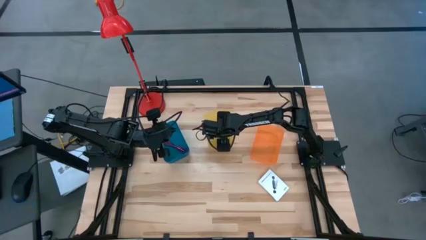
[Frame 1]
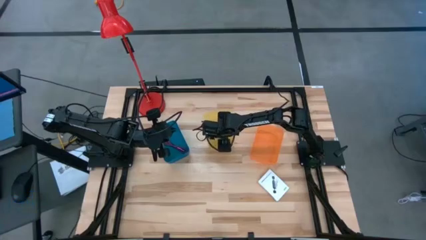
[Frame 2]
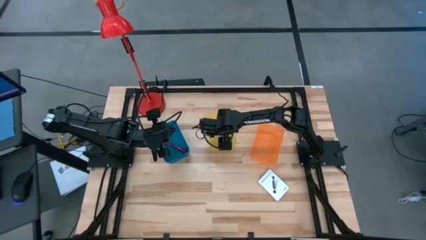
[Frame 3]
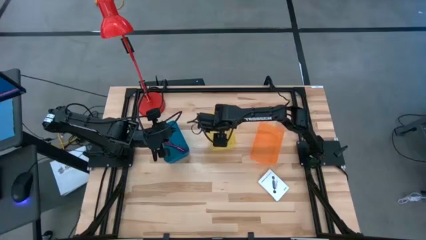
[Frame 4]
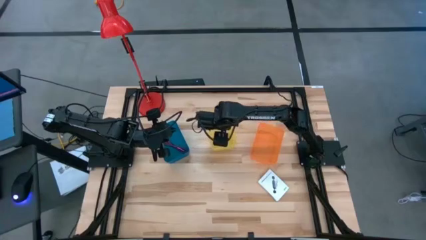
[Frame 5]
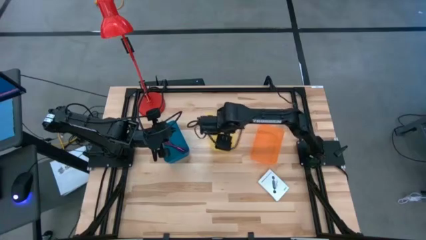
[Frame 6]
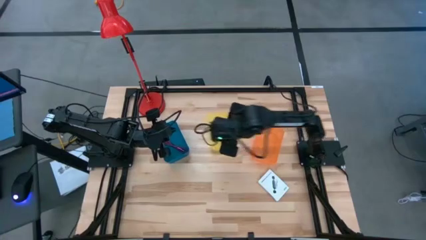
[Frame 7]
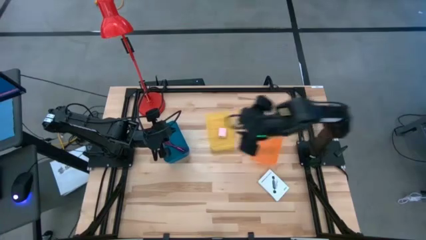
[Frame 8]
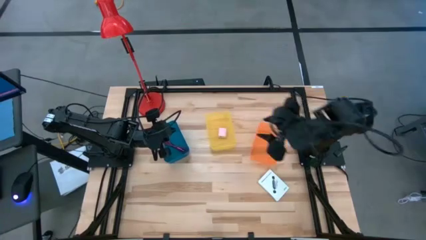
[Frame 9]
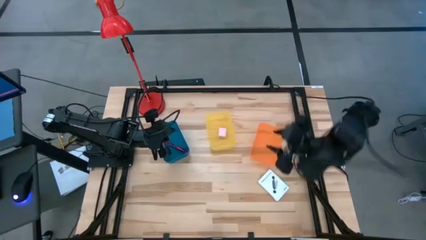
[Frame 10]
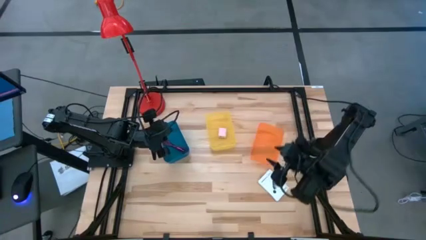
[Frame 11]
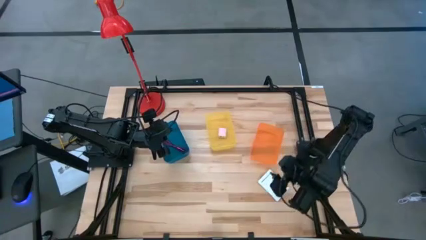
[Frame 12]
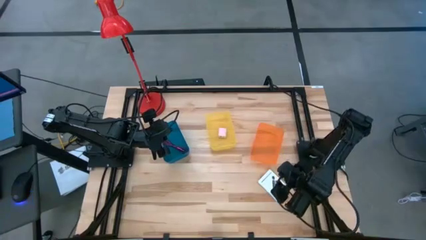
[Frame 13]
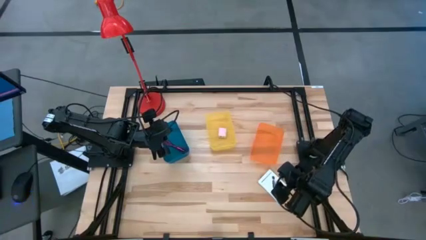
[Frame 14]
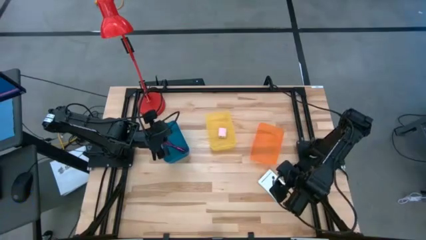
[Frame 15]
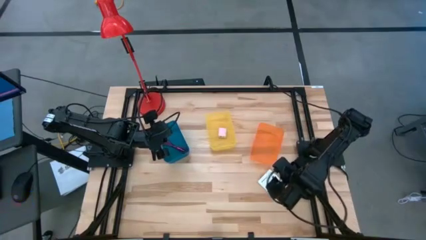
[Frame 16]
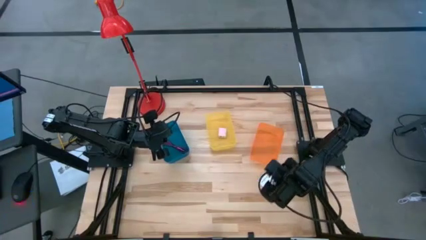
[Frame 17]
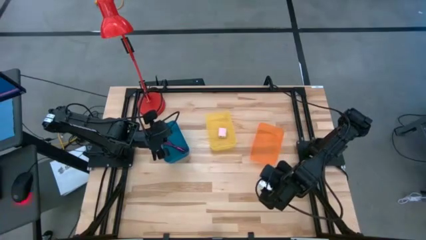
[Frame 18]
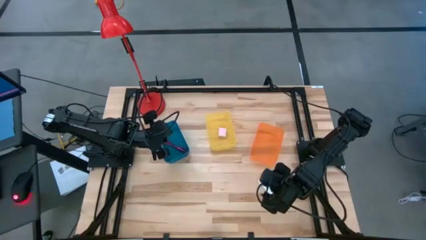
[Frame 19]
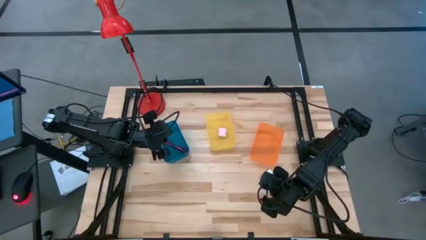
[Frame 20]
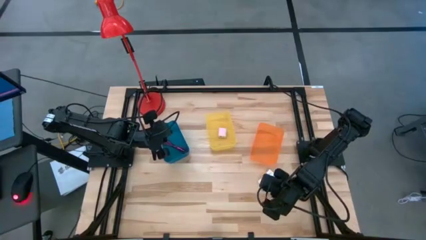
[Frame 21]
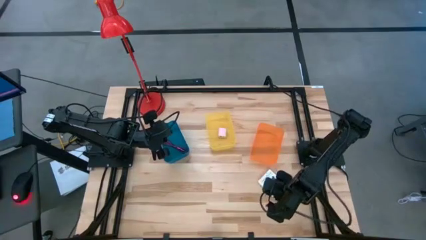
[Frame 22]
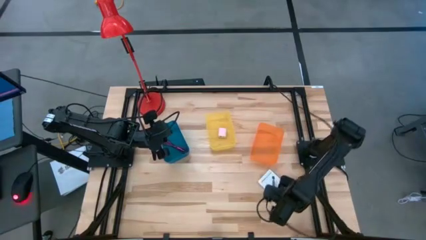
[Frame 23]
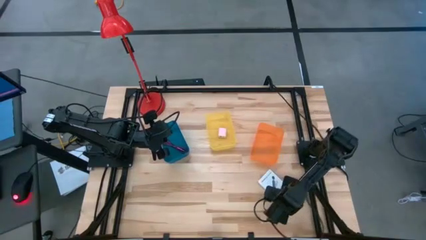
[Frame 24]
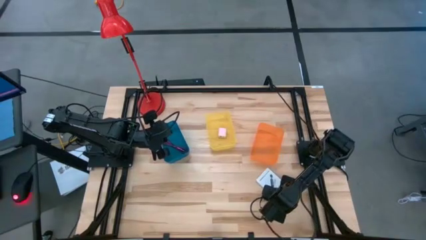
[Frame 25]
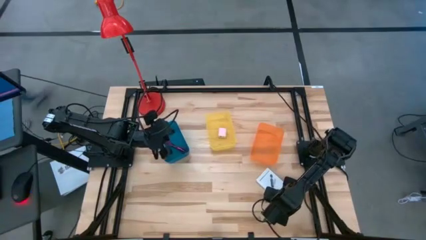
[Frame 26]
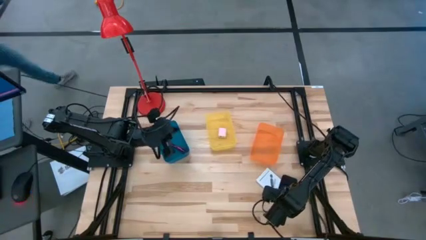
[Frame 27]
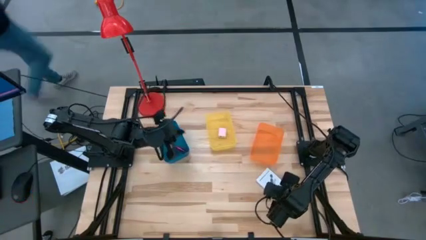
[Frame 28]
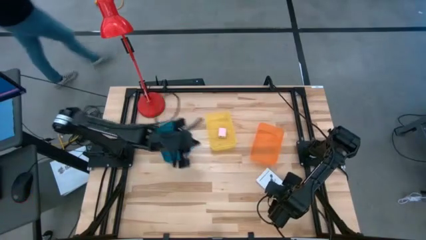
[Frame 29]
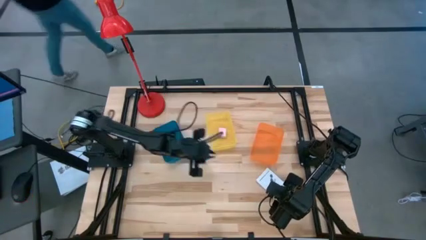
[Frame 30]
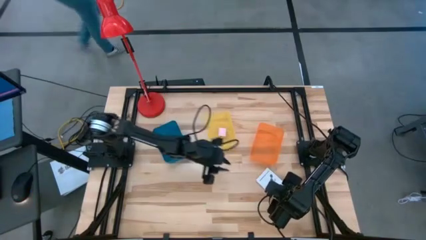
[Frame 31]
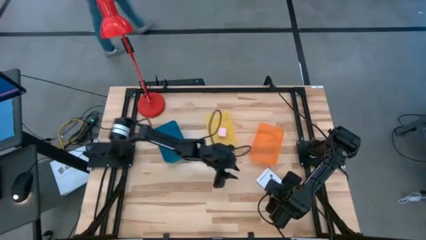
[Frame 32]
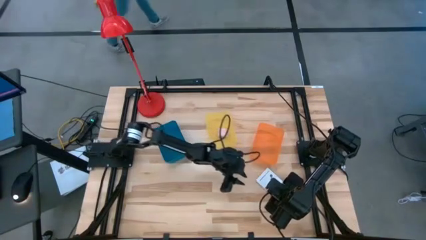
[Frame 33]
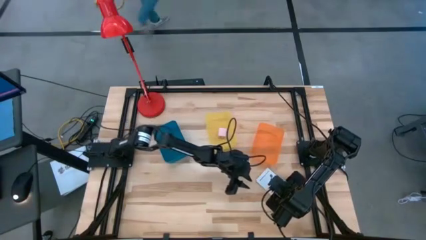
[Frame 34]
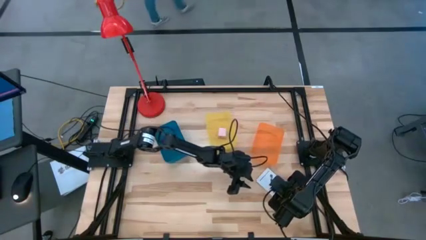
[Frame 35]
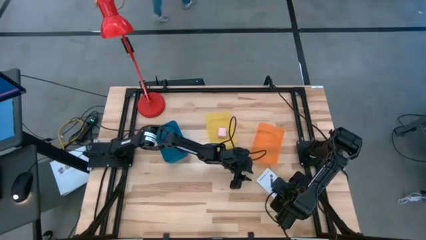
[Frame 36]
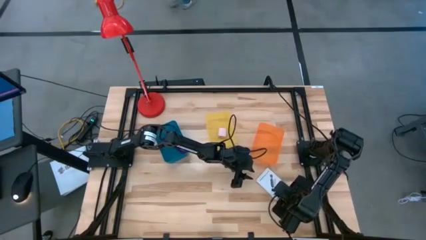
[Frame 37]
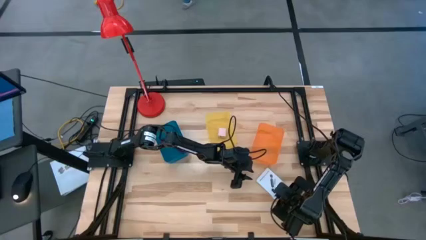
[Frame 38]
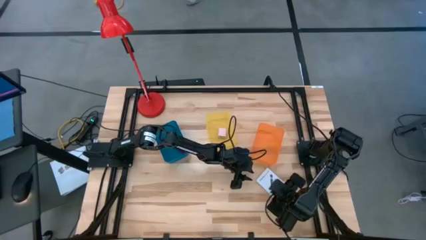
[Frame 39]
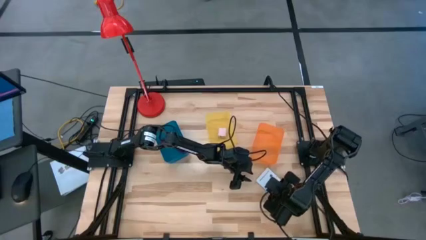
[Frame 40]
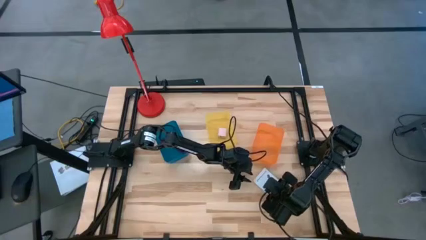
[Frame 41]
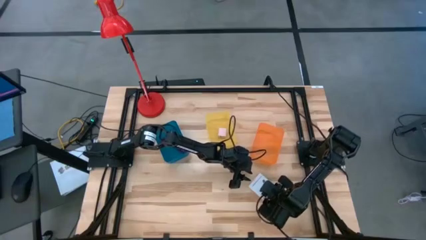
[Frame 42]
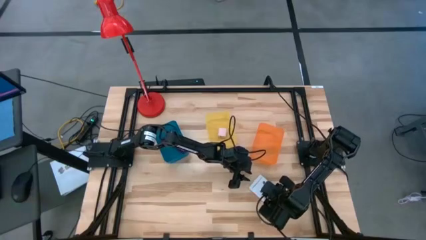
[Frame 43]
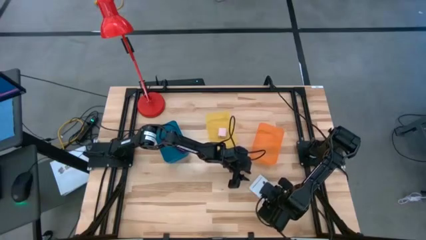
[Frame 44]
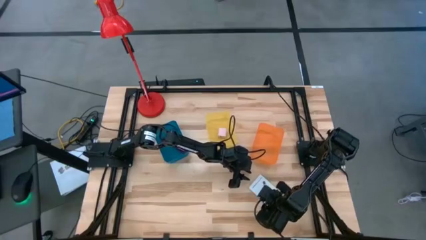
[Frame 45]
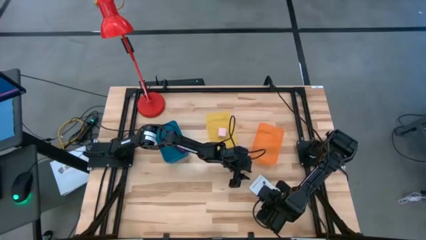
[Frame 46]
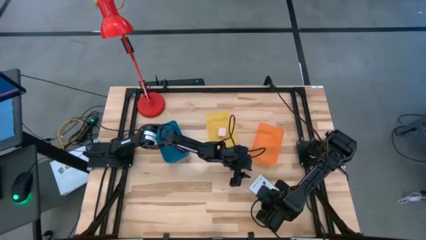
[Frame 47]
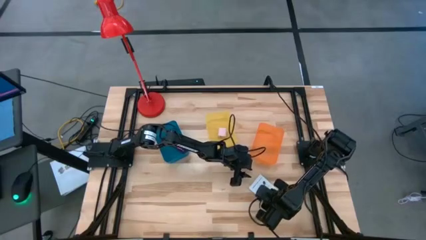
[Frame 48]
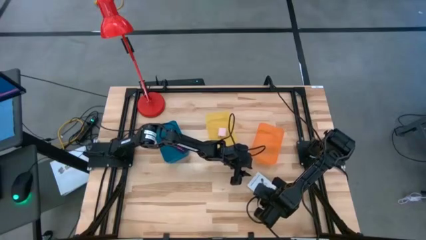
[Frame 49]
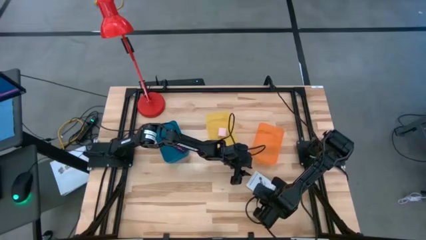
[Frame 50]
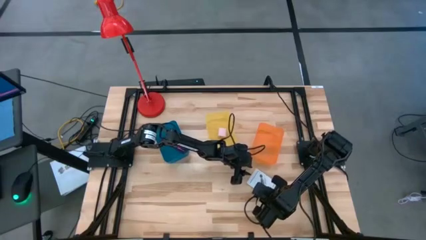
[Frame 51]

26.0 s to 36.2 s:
Task: Pick and place items into bin
Put the card reader box into the orange bin

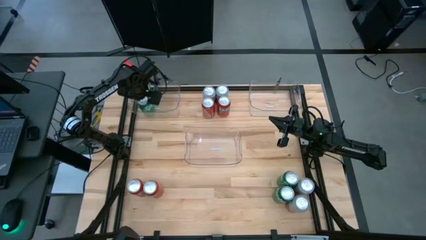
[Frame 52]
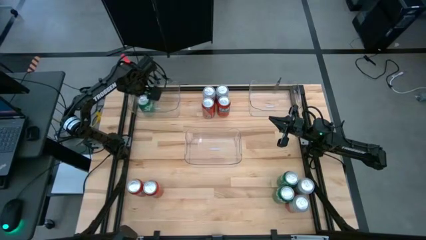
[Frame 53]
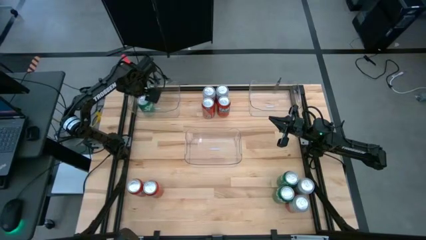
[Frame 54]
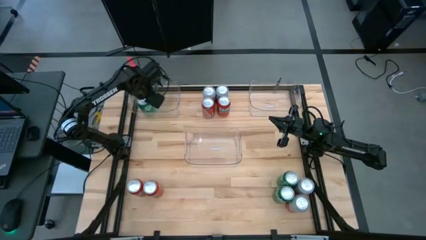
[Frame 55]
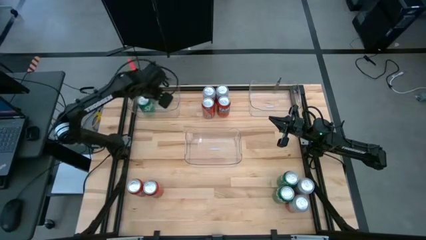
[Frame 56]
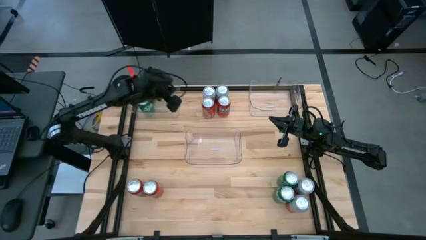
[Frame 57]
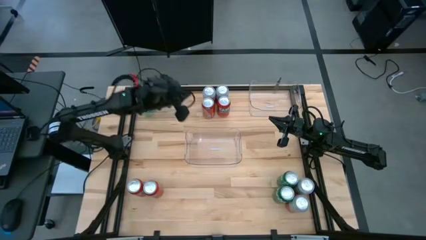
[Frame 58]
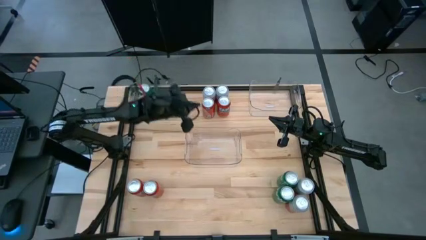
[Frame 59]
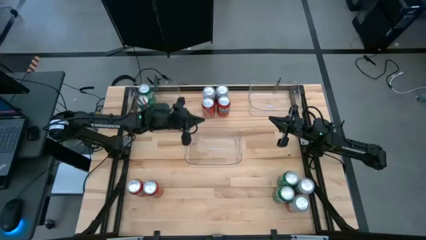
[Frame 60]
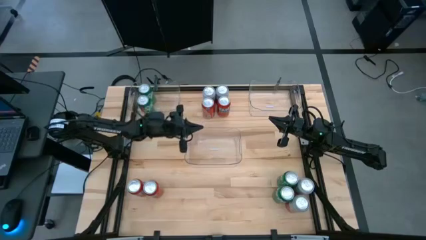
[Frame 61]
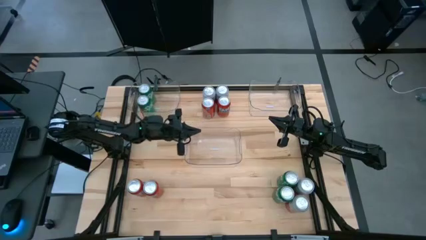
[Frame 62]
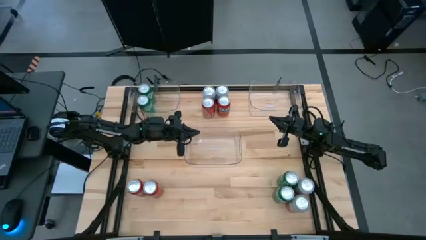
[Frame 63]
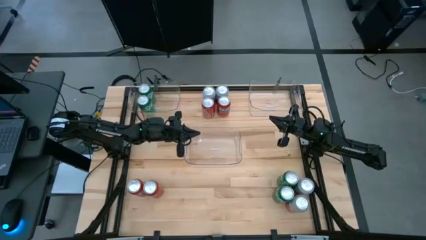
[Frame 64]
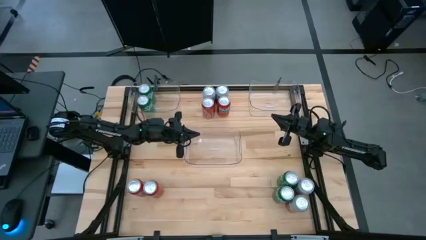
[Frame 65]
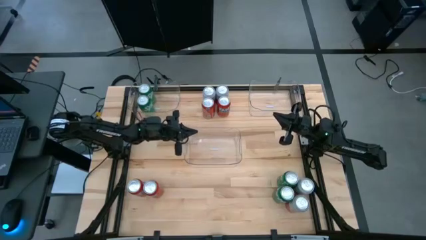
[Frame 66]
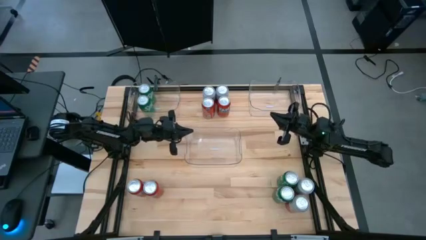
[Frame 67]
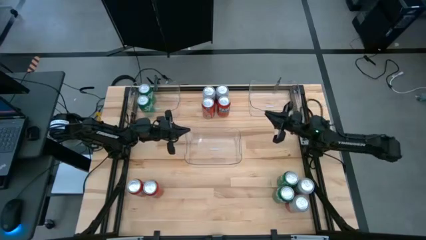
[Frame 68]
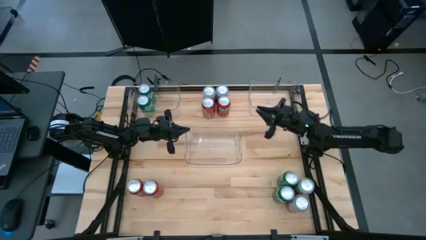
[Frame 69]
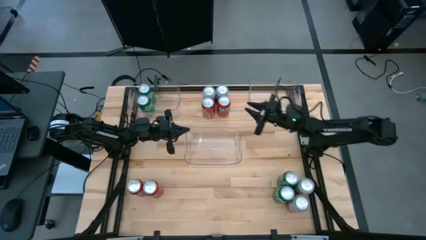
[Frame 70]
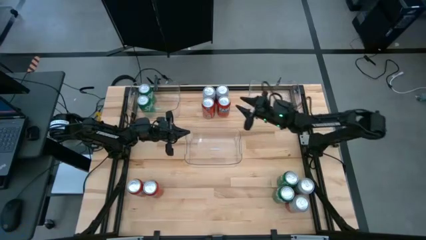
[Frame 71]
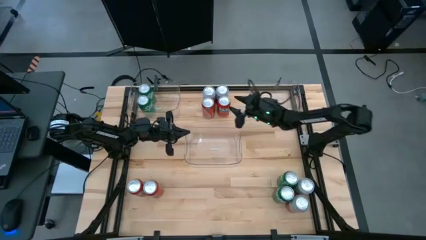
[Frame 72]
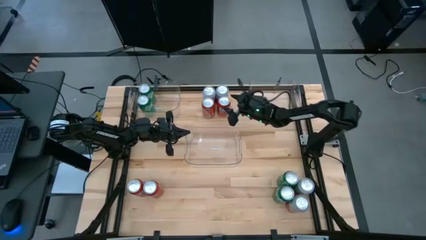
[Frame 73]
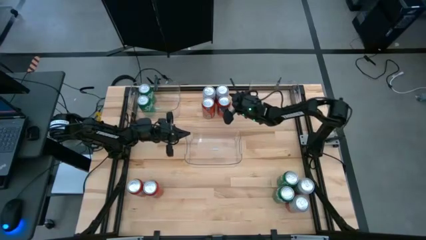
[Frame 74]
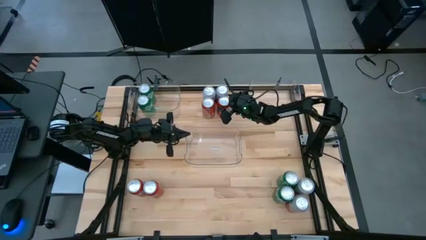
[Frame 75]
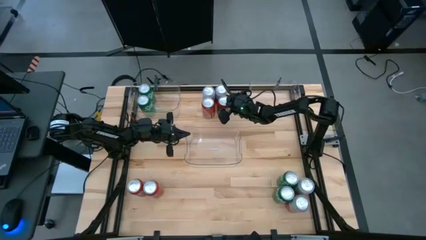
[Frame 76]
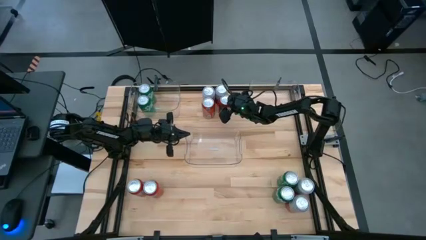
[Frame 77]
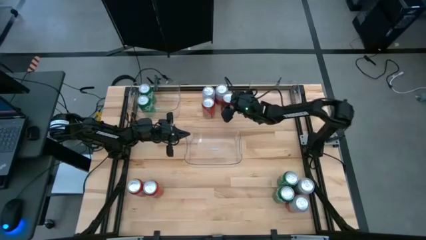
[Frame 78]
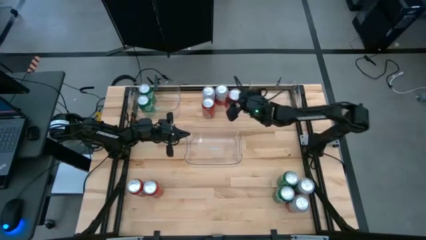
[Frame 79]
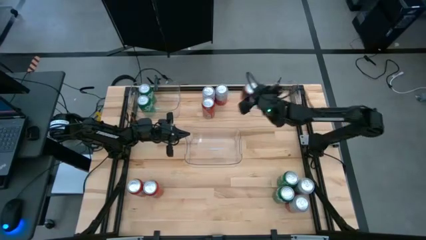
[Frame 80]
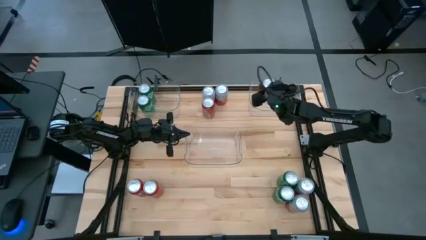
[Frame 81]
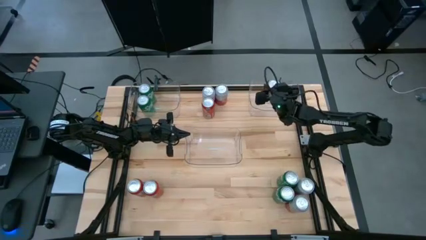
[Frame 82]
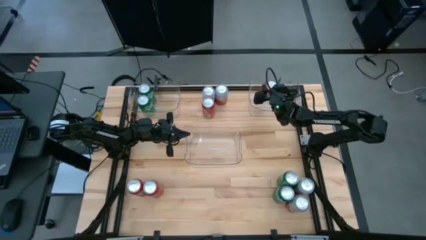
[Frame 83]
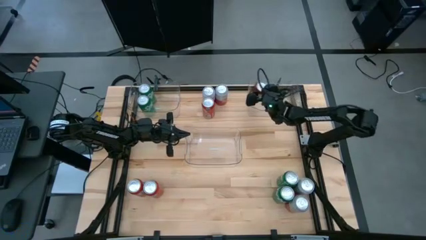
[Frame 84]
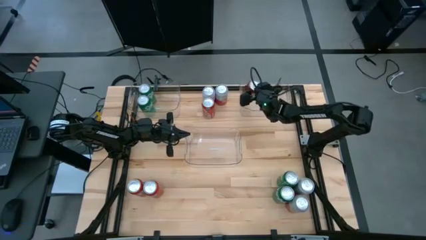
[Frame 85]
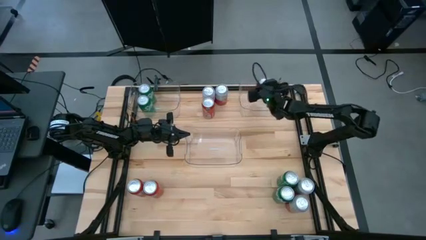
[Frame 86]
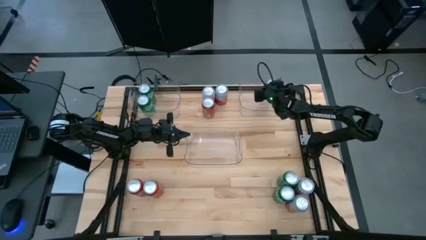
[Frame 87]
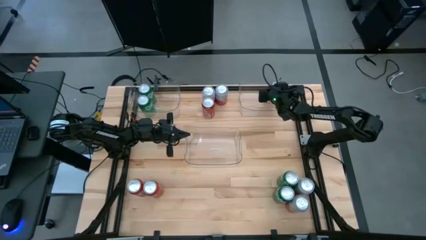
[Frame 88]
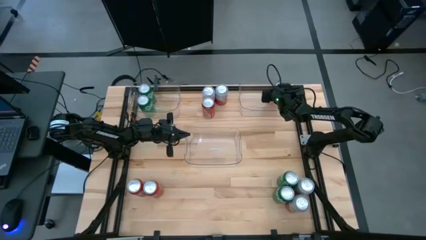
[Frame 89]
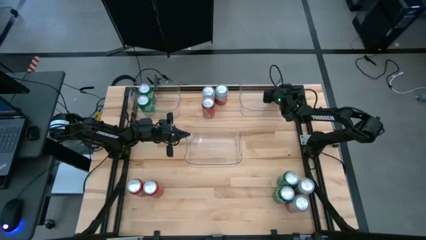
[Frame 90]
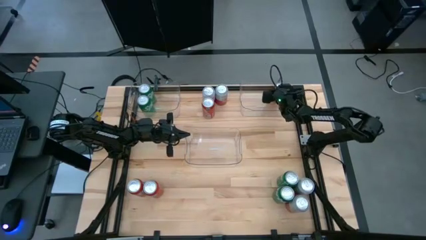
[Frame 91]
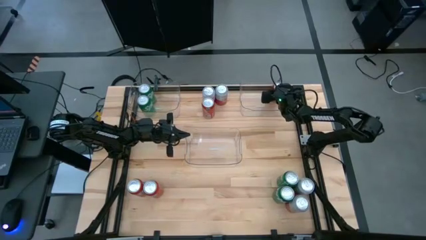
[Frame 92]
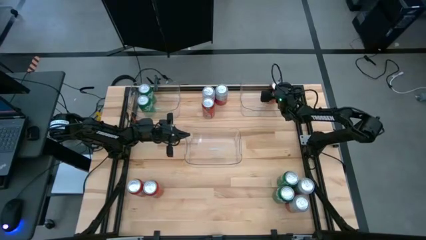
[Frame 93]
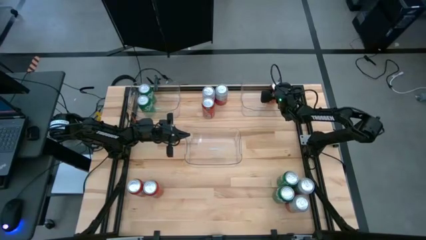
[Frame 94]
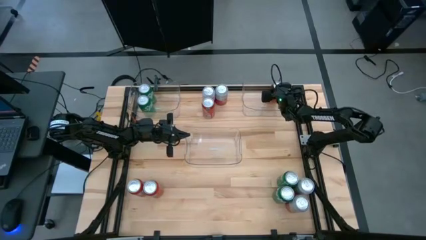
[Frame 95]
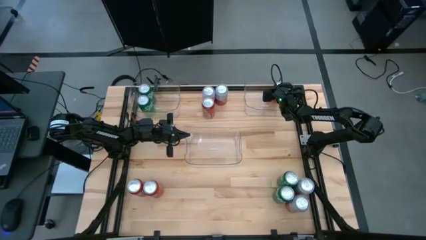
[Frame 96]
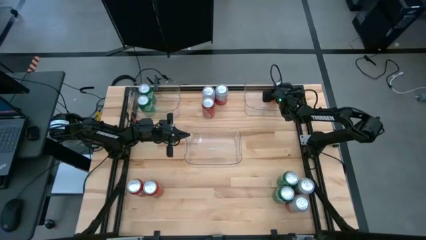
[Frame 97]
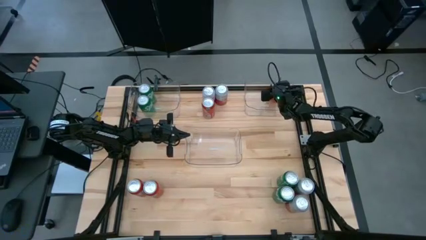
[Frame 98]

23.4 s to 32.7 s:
Task: Sort soda cans
Put the red soda can into the top right transparent bin
